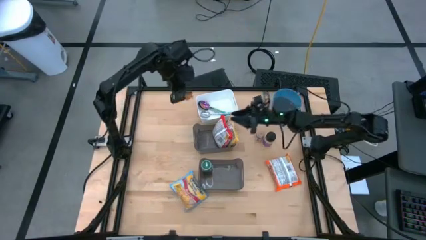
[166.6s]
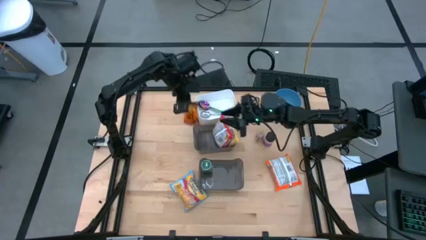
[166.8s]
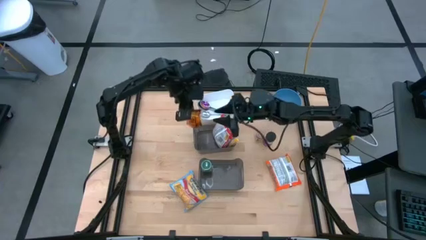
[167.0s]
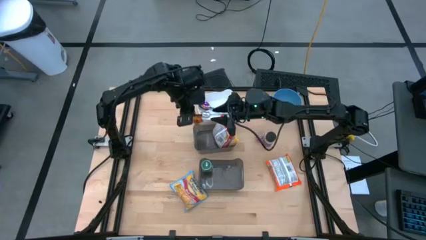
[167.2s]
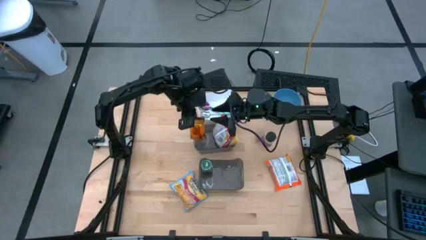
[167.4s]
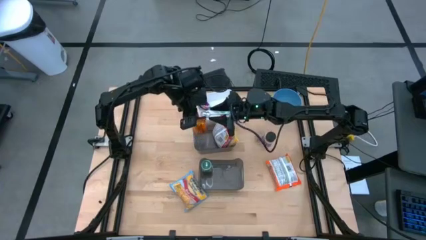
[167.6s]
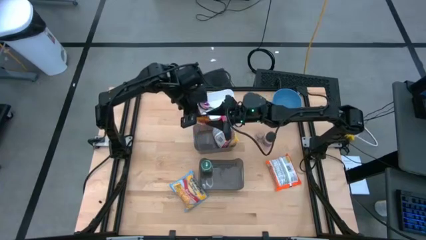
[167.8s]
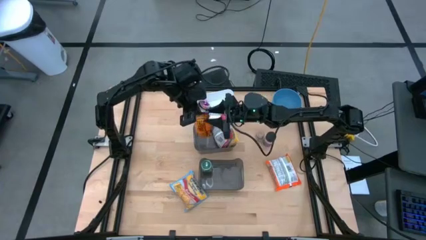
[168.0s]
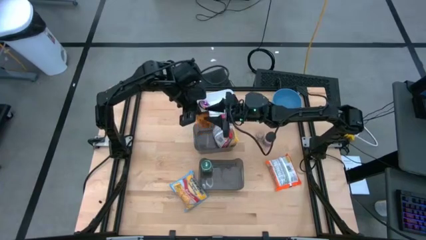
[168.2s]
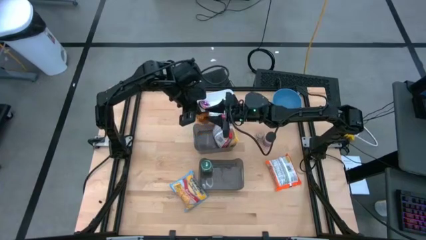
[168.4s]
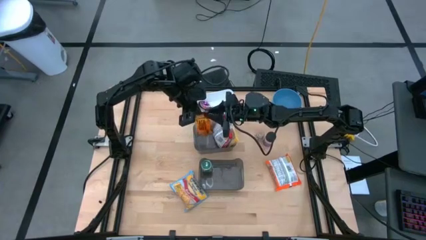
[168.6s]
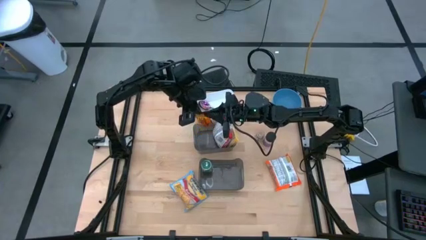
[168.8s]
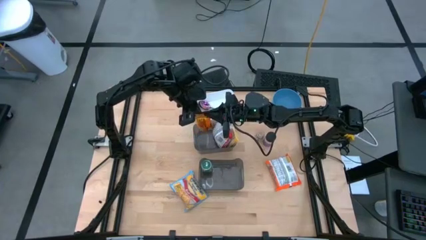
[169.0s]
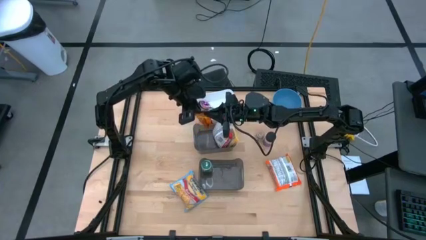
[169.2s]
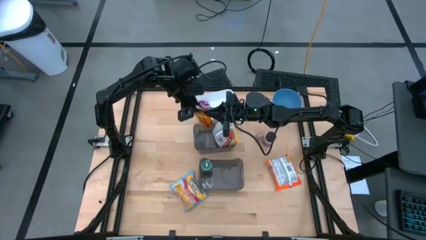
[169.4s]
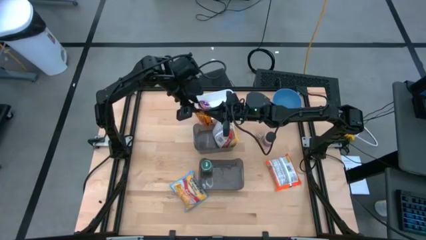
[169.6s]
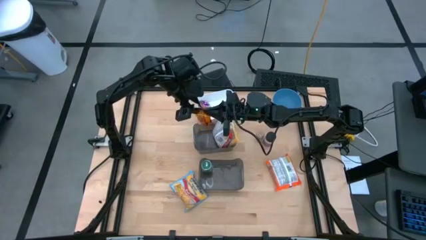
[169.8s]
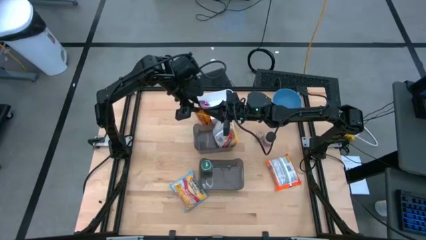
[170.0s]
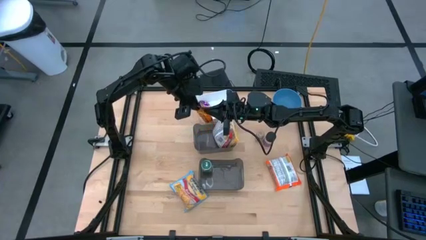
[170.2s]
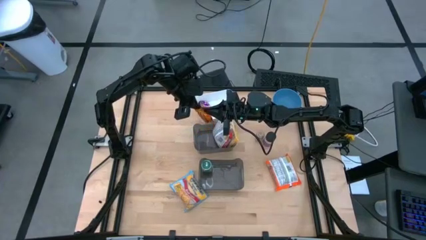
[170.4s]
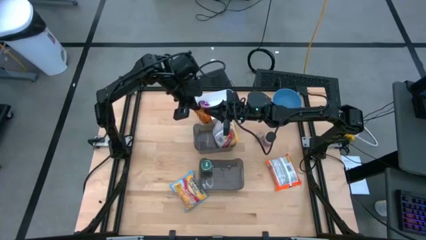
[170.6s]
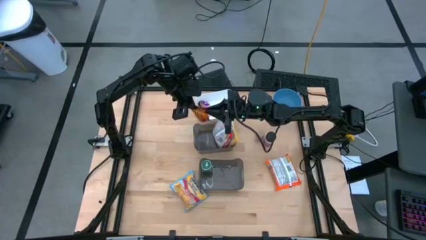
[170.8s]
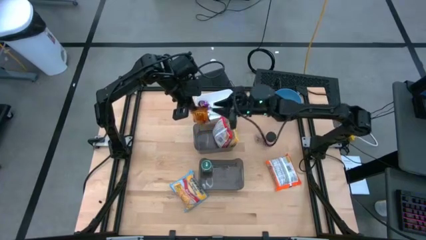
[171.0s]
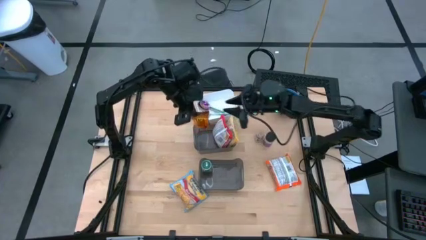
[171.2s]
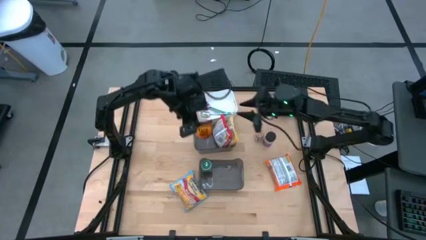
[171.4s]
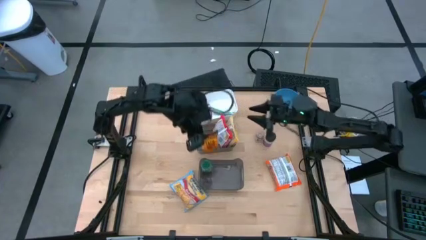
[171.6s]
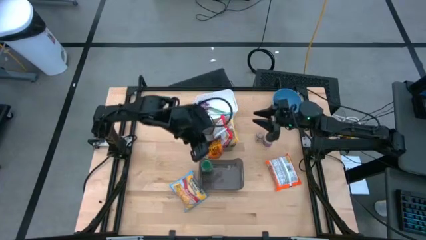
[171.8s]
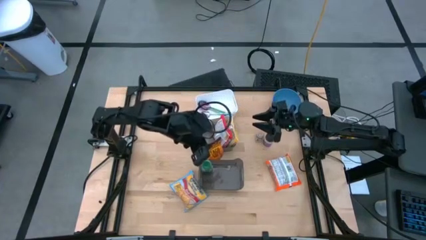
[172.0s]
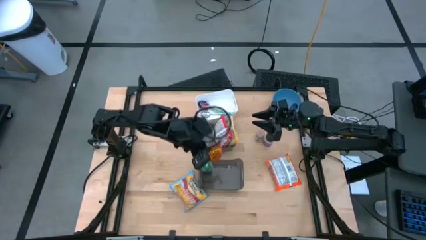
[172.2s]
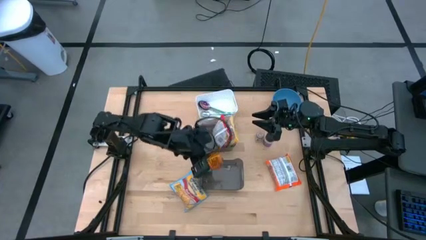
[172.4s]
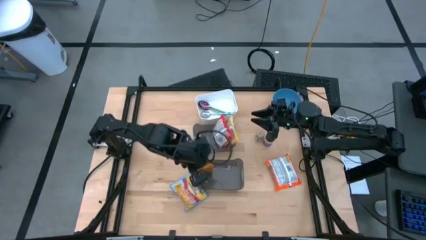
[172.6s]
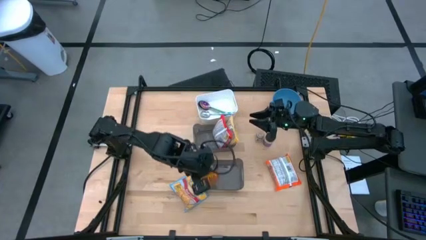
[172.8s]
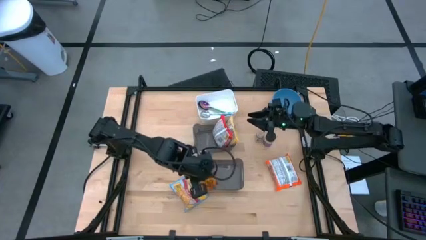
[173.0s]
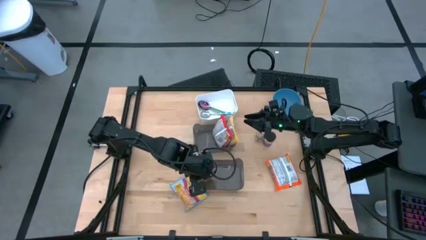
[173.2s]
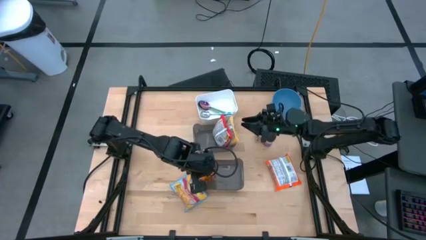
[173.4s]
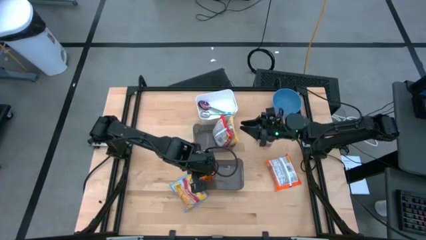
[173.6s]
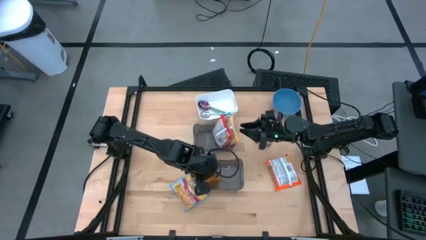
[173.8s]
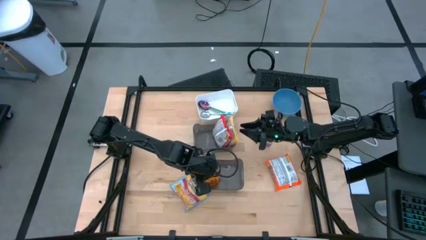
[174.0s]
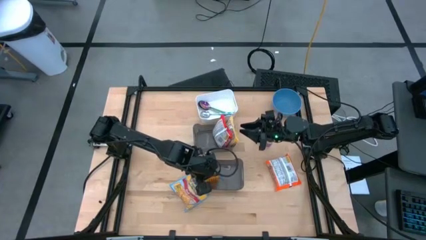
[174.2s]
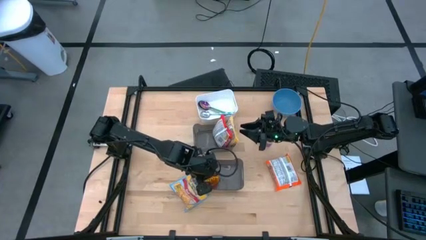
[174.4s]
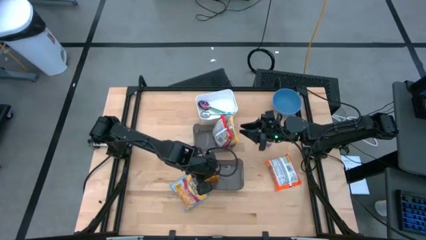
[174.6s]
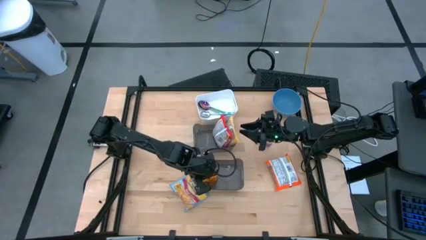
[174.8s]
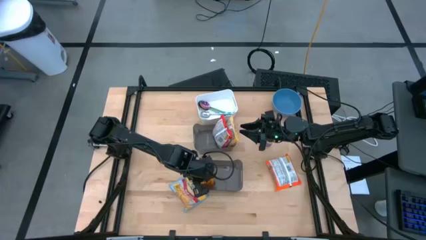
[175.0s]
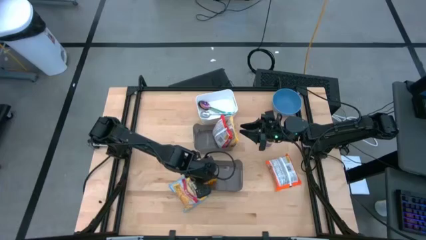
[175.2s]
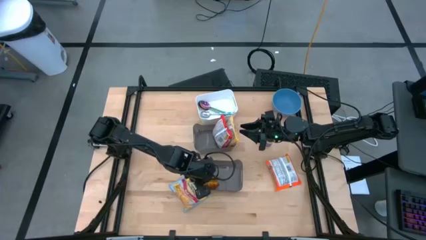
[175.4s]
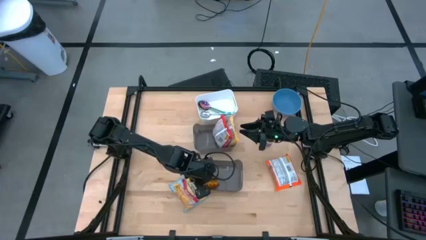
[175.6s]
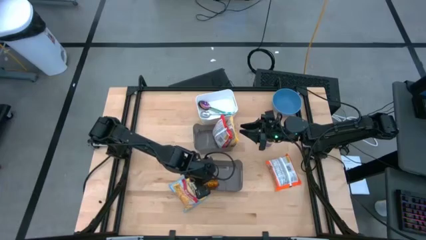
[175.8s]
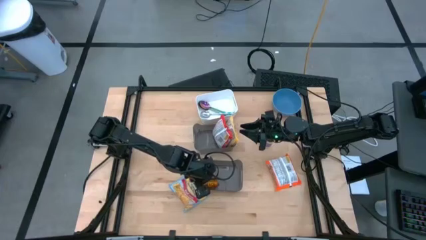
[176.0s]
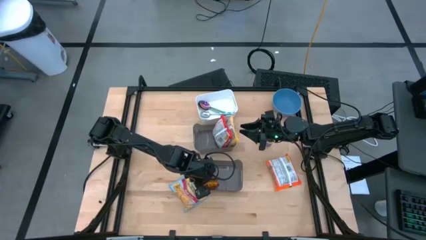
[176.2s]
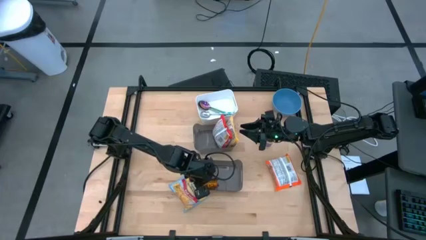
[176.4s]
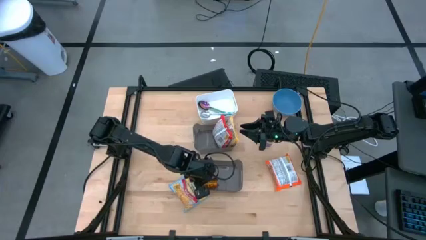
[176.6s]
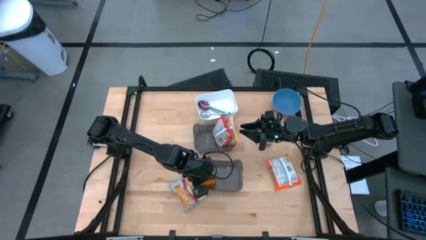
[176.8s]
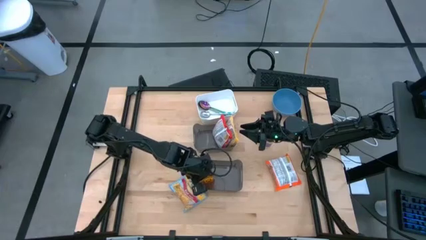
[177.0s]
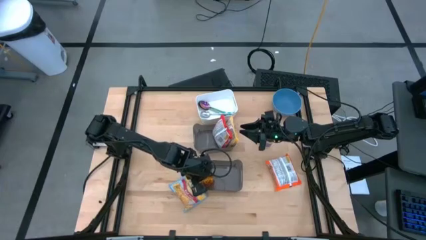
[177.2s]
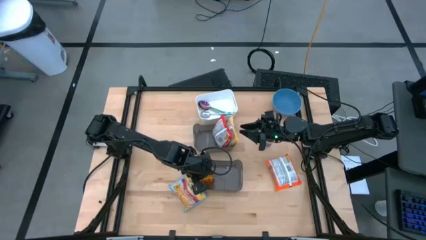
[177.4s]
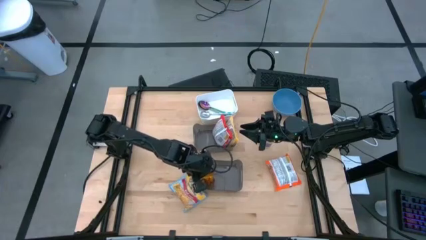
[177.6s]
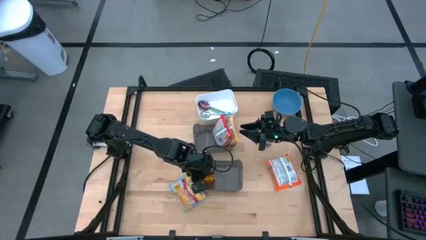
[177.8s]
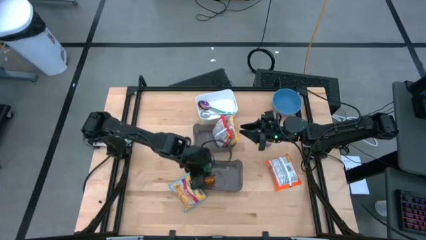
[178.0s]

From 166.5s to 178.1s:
Task: Pick & Place Food Item
Put the orange seasoning pack into the bottom black bin

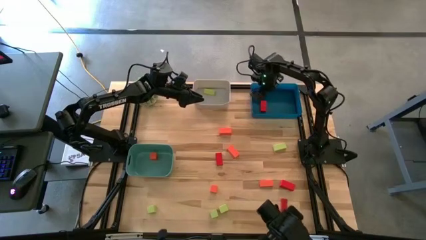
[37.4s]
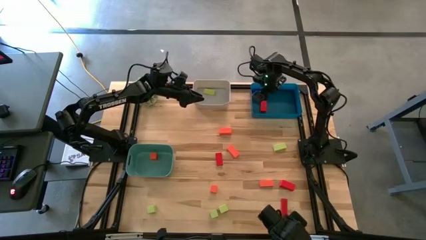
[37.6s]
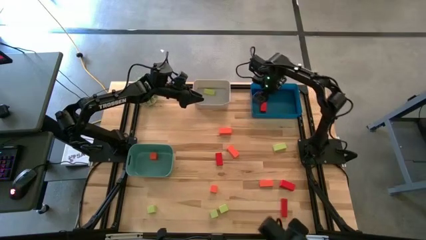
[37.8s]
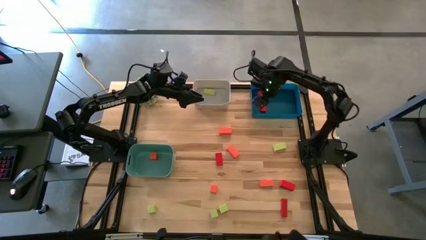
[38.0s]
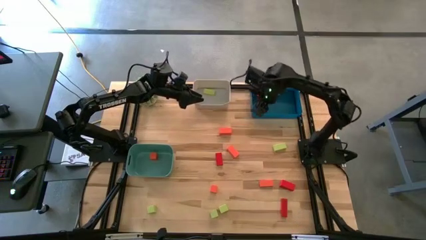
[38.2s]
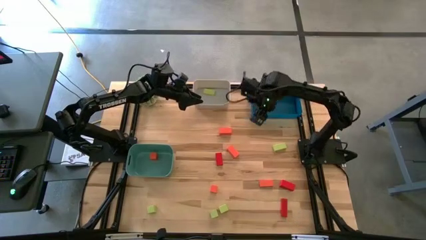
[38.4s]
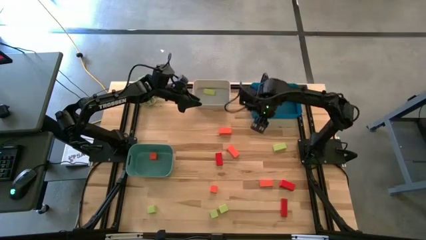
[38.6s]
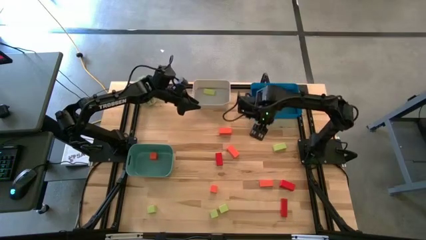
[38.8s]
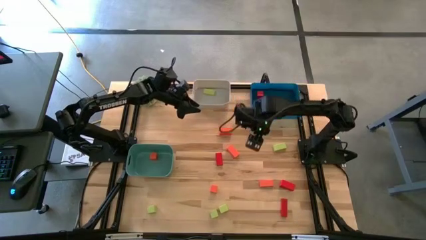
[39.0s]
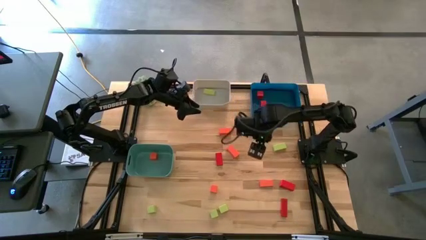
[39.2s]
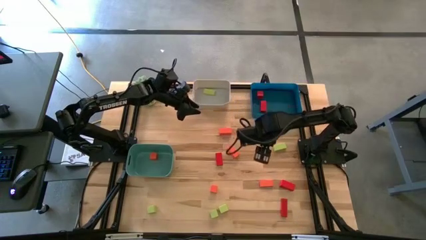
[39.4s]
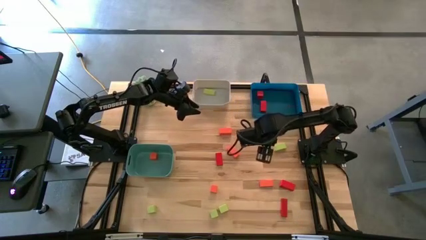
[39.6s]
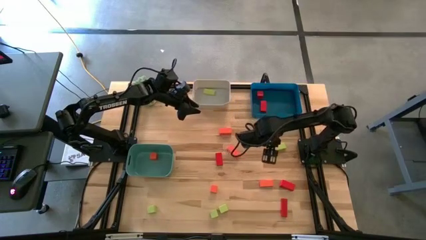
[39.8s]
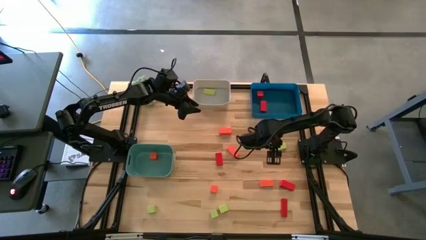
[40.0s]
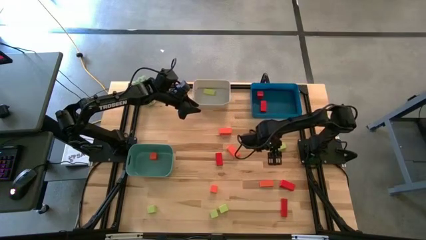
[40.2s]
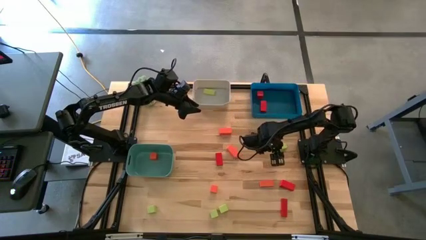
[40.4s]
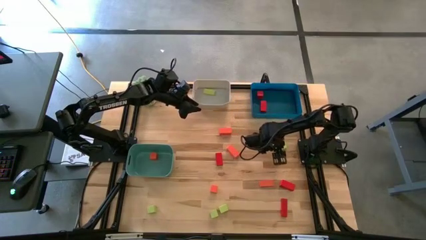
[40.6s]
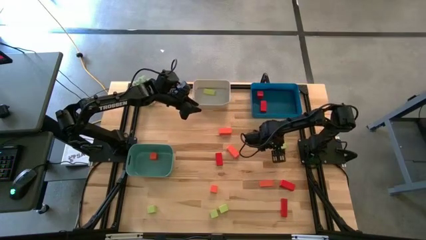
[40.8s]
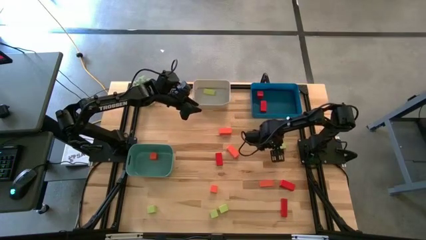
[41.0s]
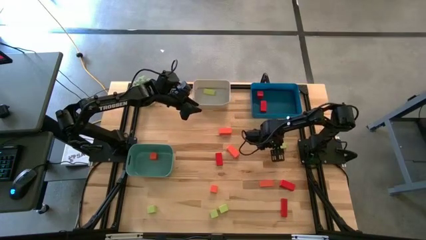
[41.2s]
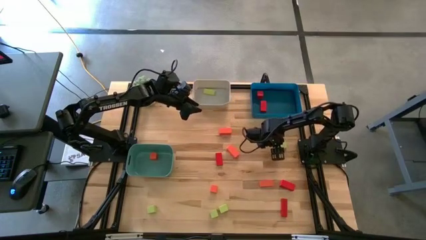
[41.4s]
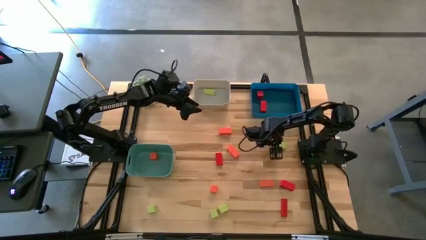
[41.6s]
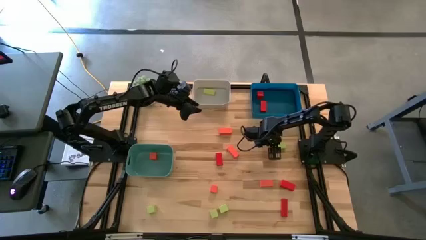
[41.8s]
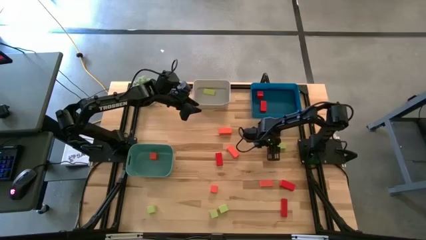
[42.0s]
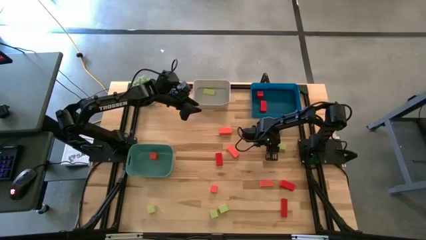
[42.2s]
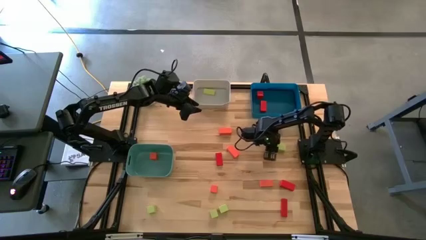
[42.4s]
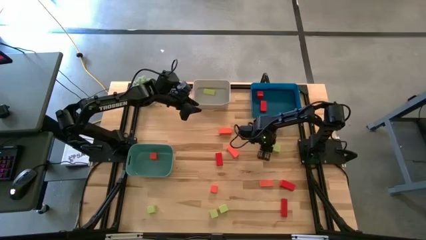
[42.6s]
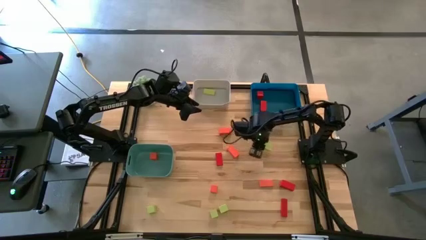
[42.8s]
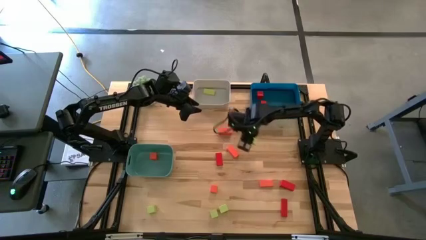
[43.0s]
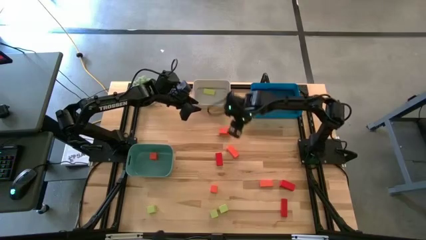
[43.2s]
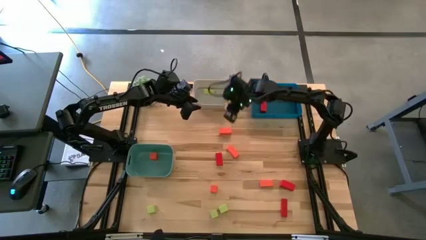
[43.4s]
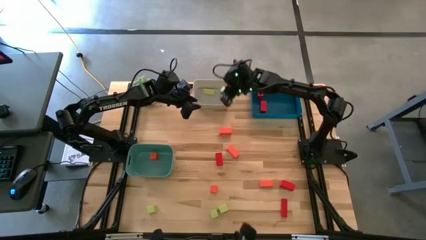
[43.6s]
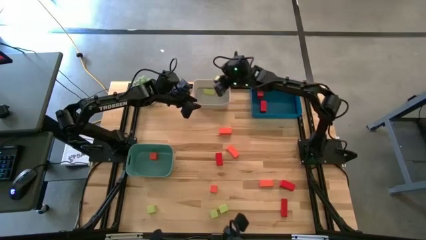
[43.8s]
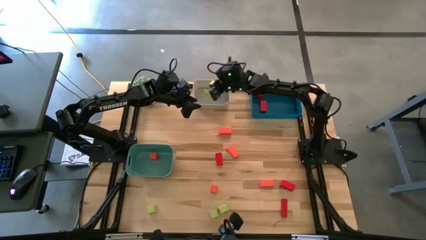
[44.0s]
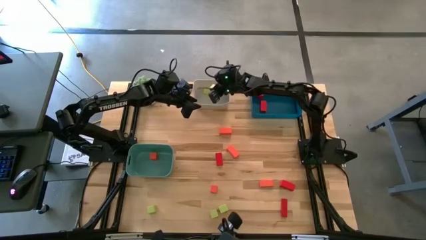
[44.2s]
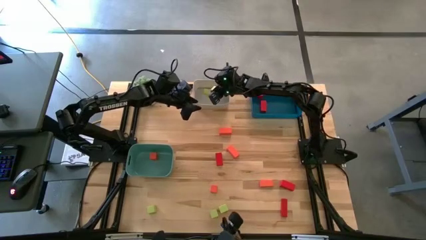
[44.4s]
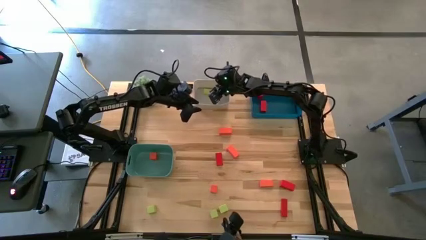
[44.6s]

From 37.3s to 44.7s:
Task: Sort & place blocks by color
Put the green block into the gray bin
